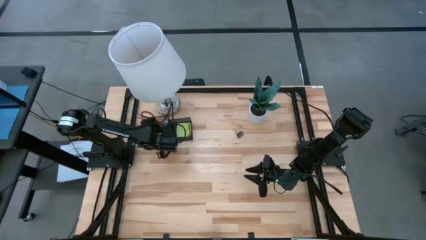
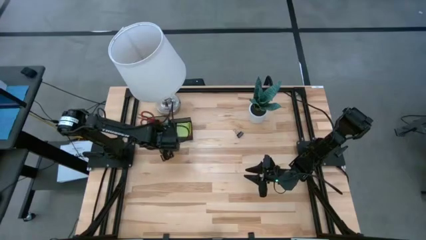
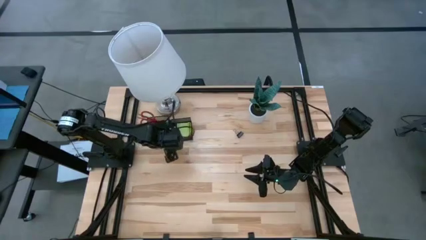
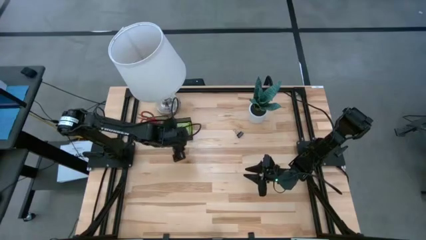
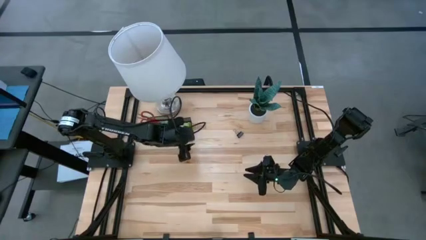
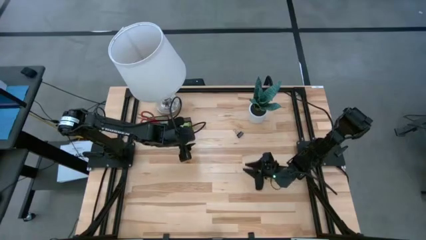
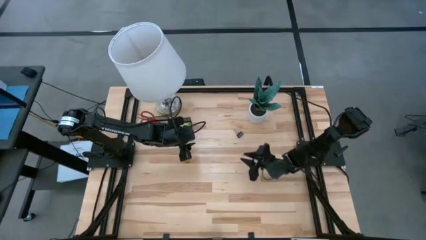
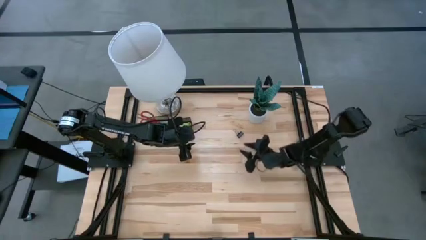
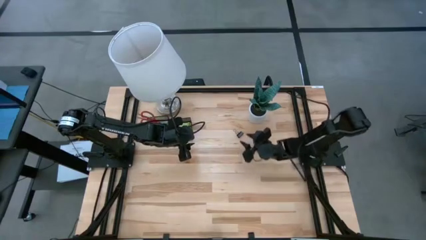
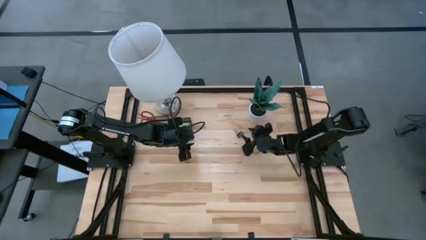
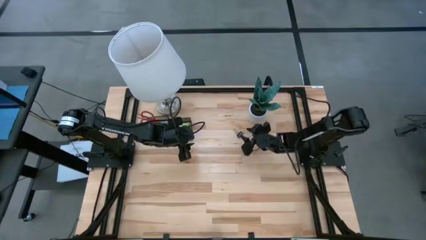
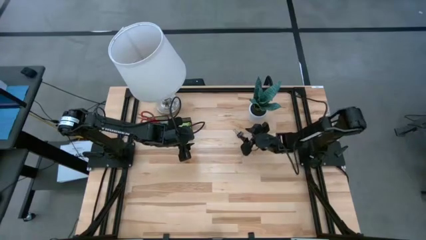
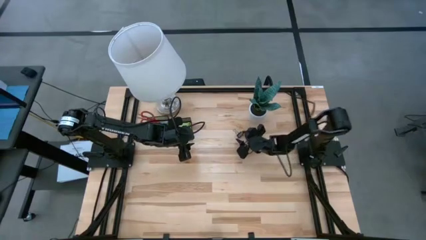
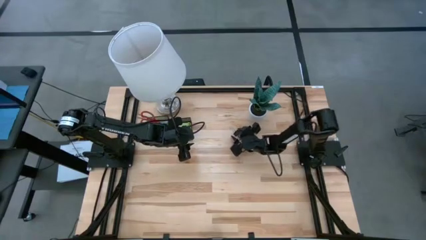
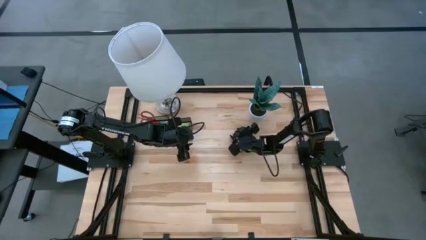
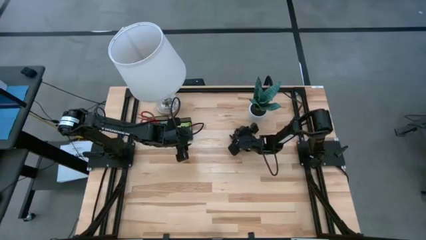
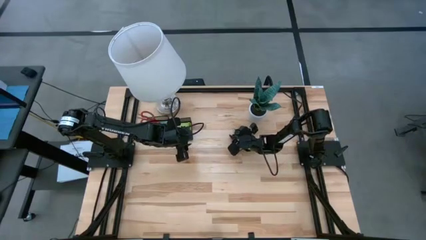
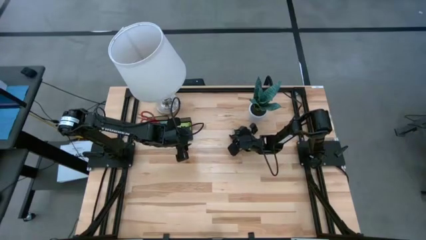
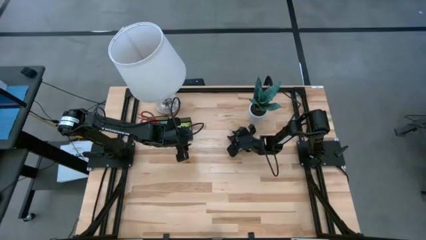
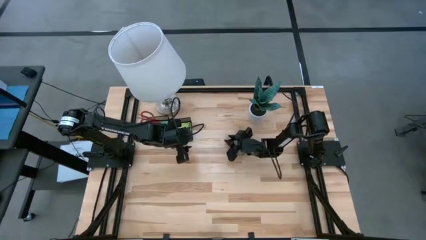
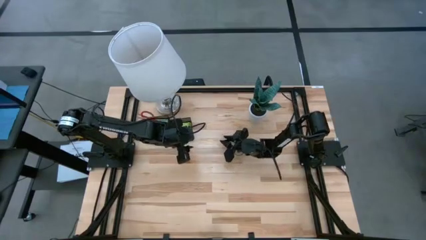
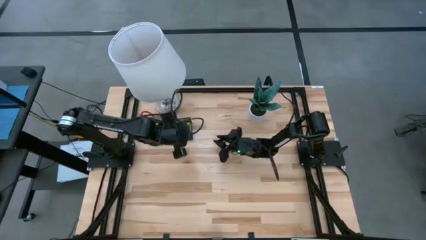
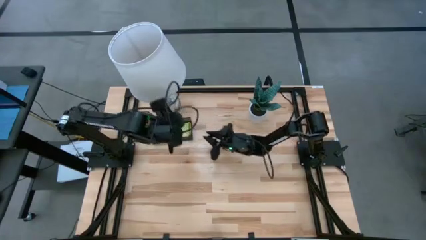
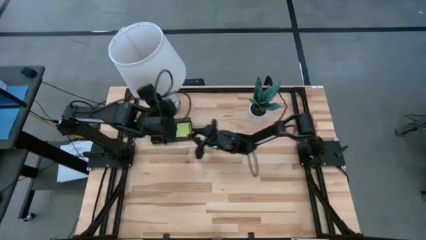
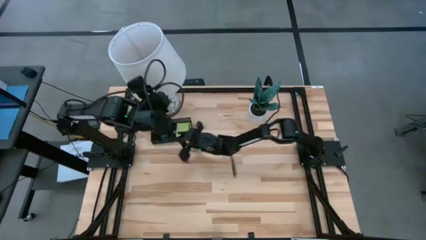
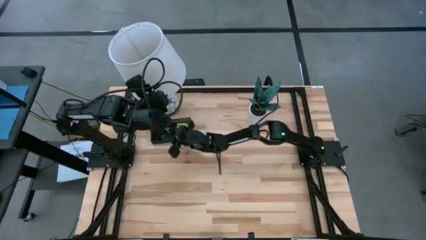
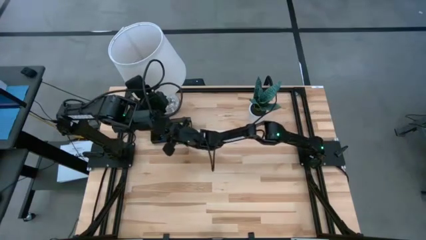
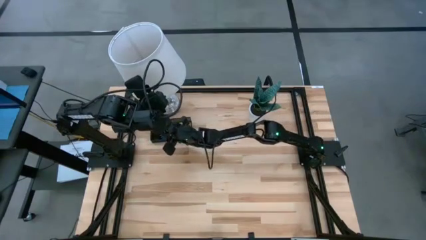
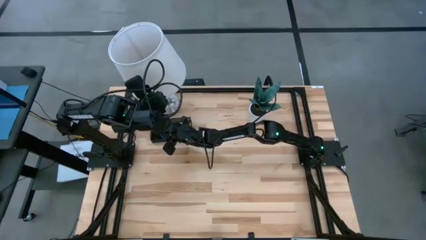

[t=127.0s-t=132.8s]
Task: Pick and place office supplies into organizer
Put the black binder clip into the black desk organizer

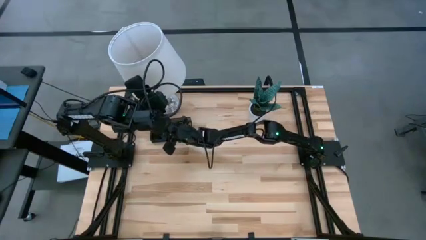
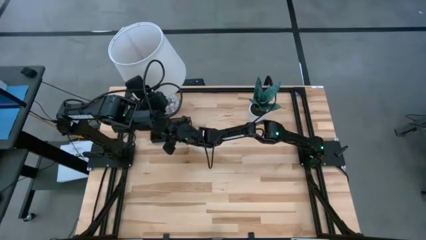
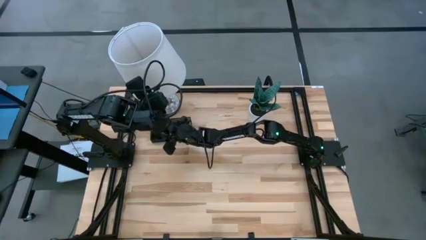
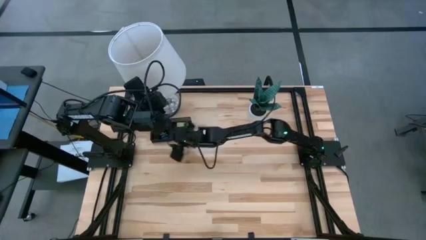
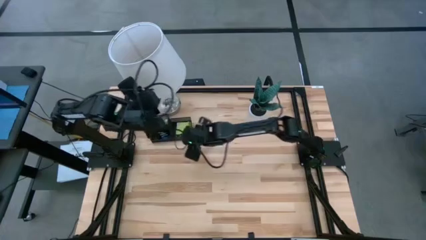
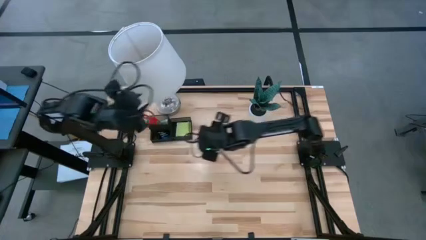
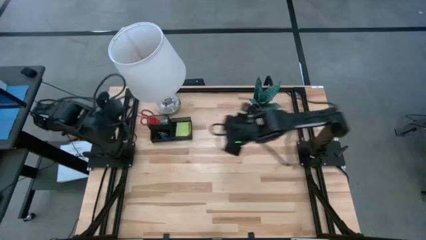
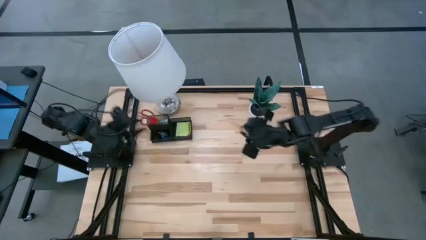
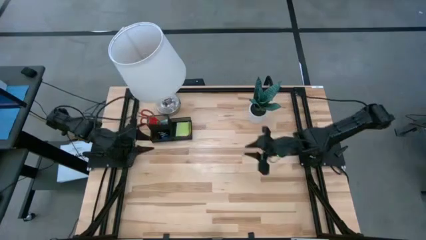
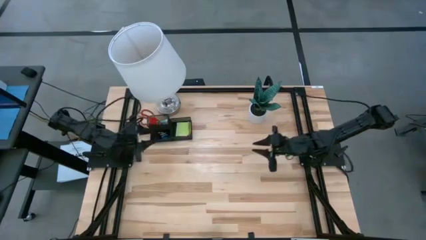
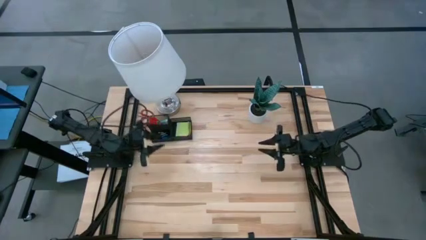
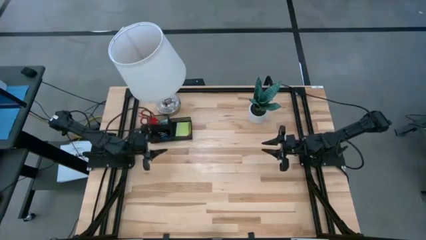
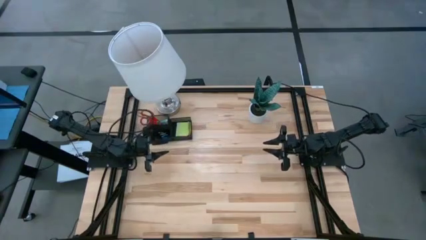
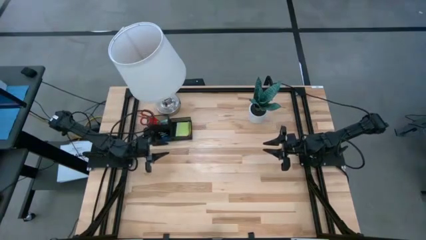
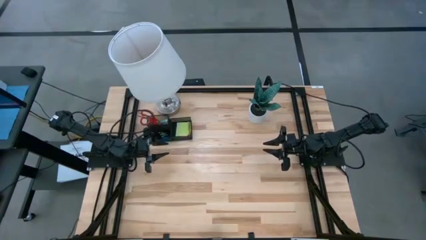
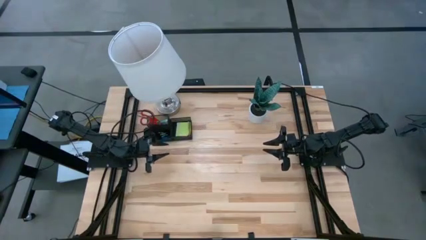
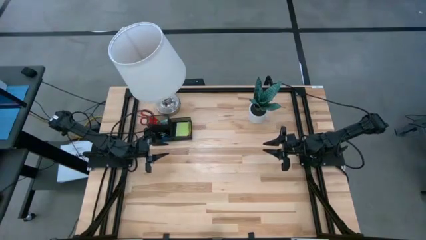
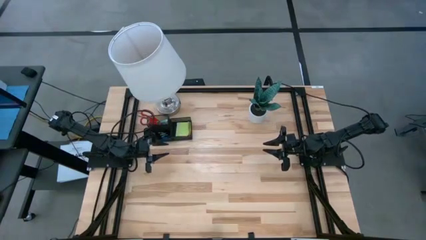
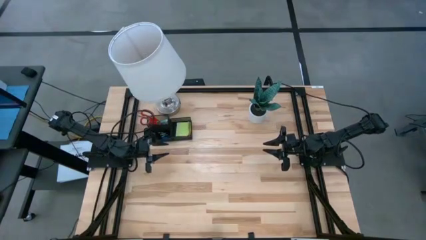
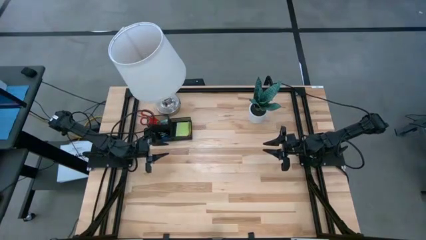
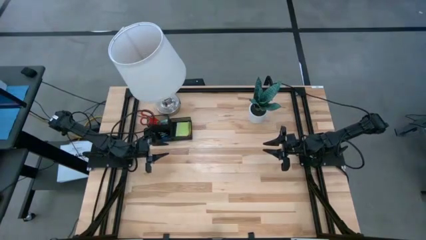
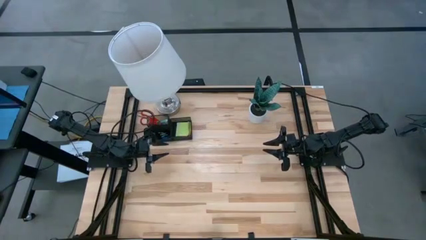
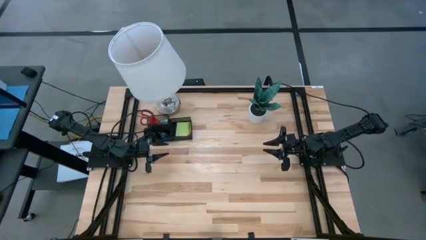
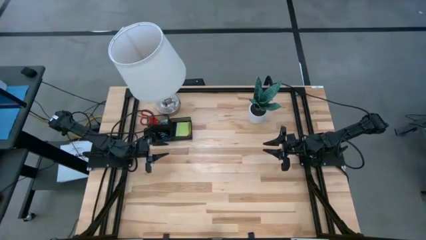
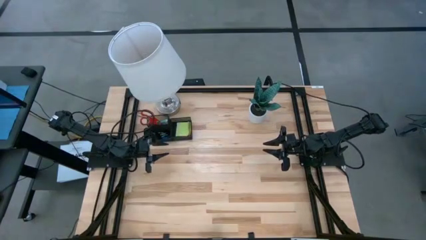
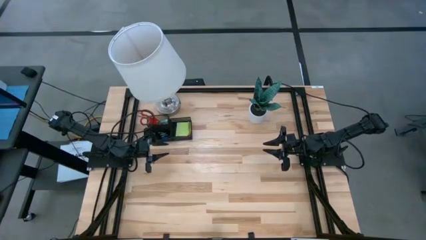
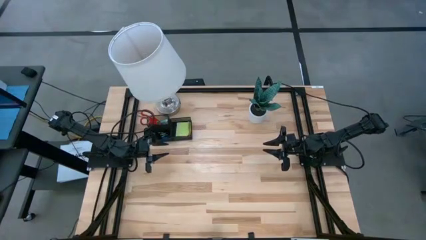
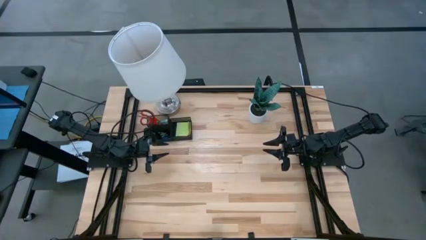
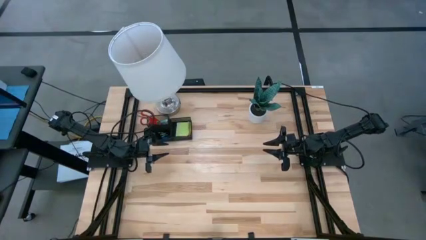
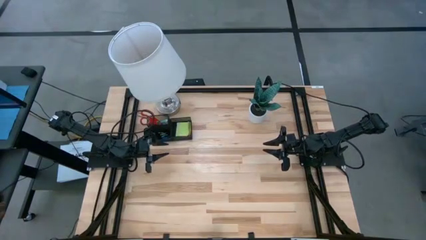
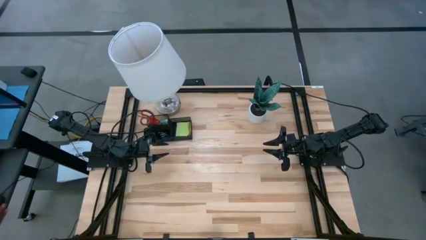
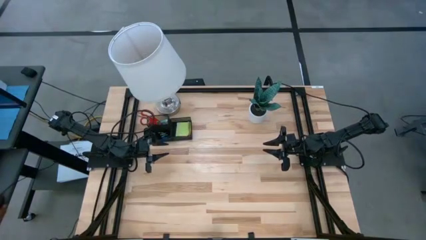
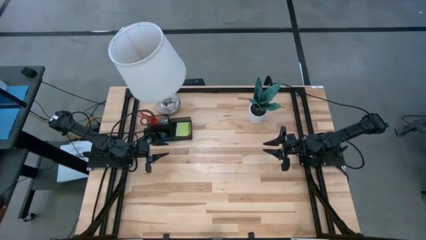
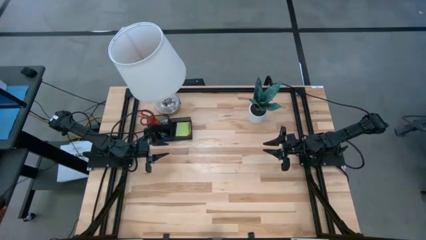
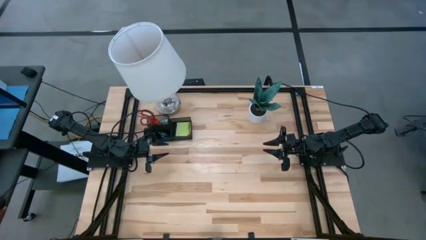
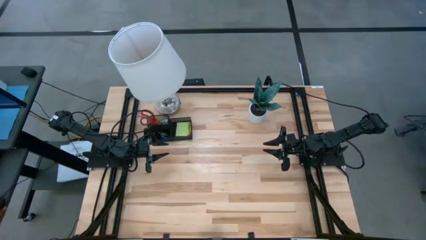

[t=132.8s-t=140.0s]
Return to Home Position

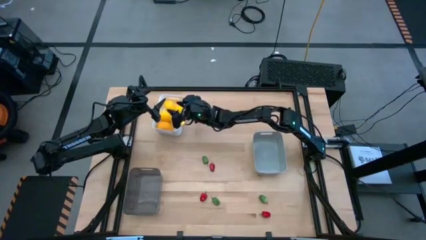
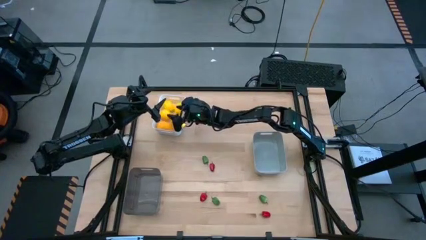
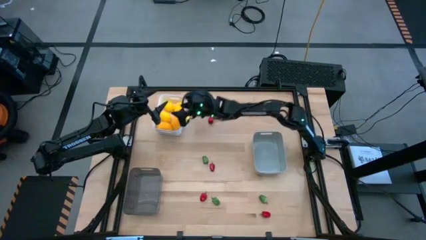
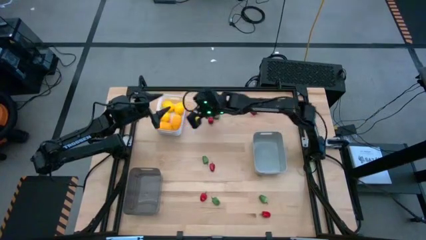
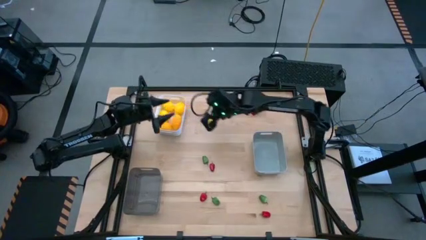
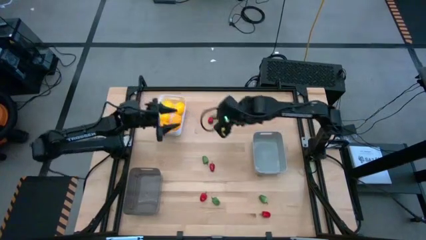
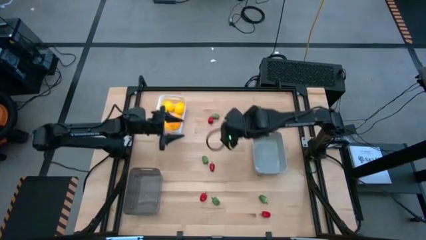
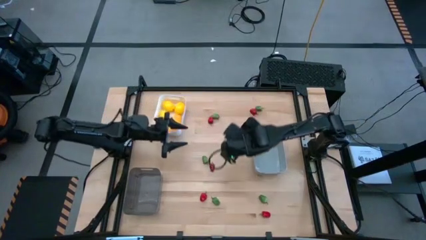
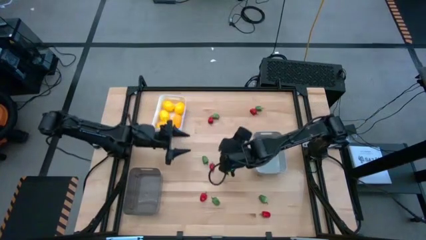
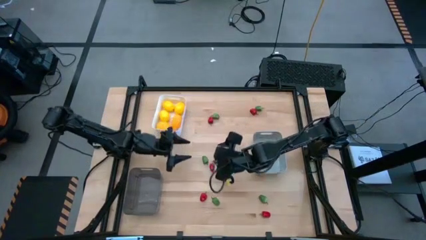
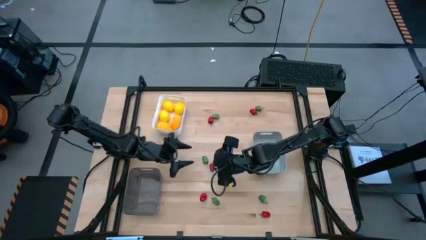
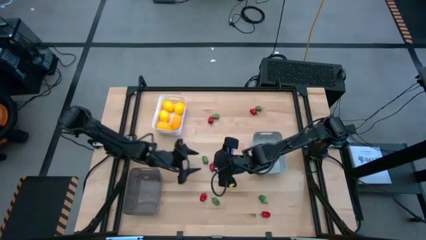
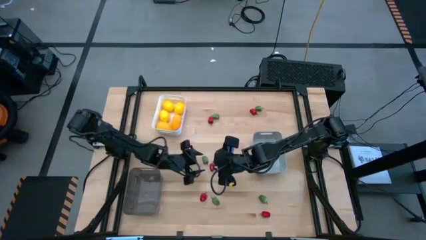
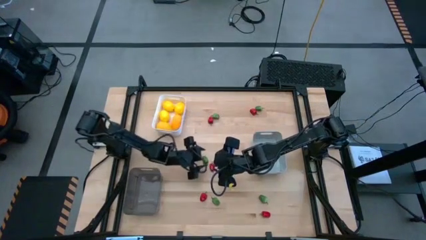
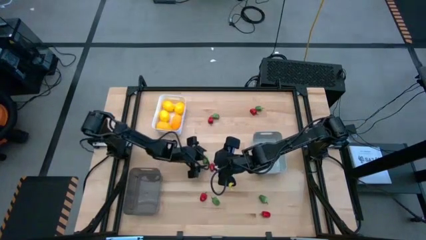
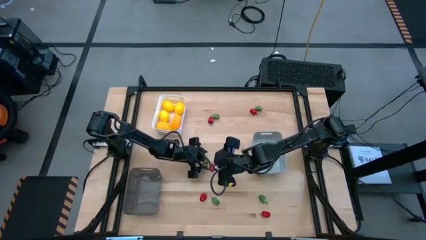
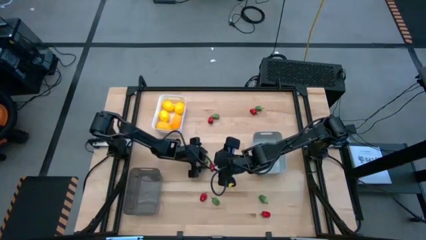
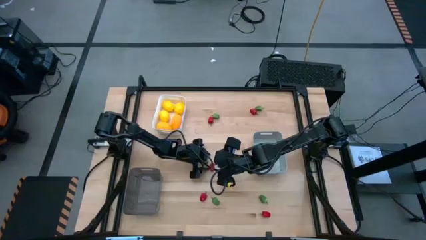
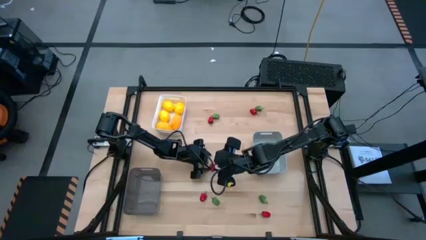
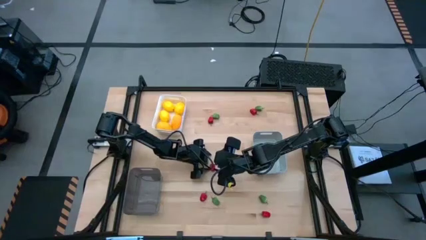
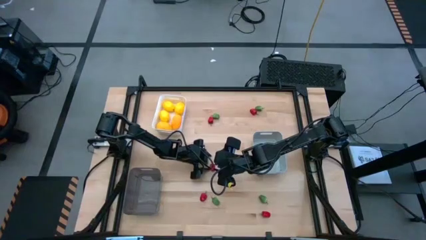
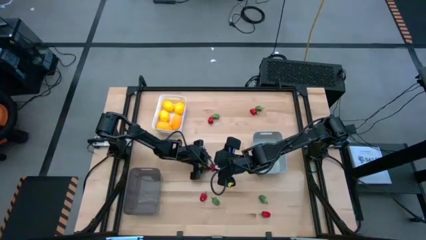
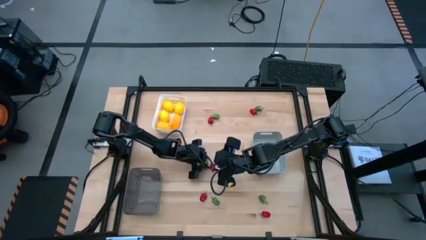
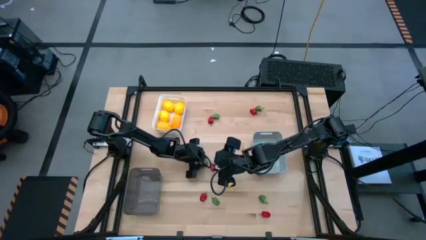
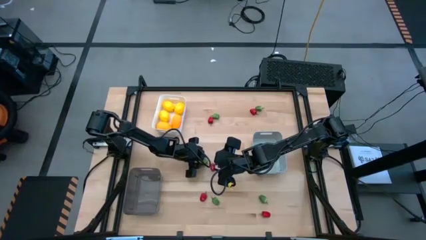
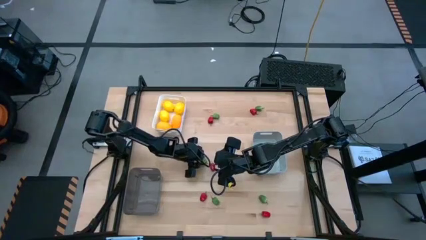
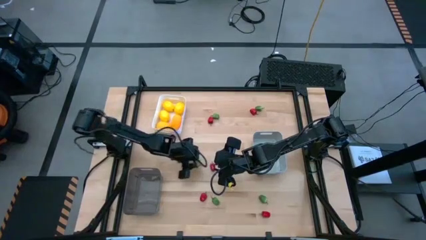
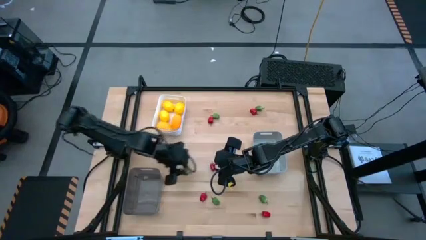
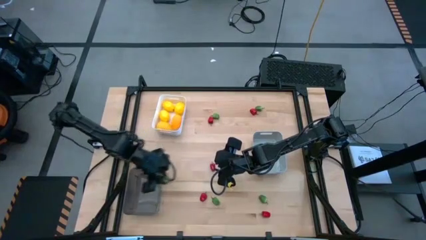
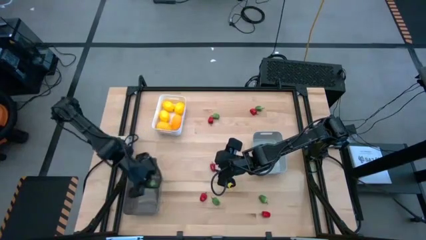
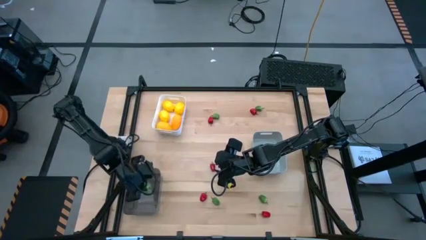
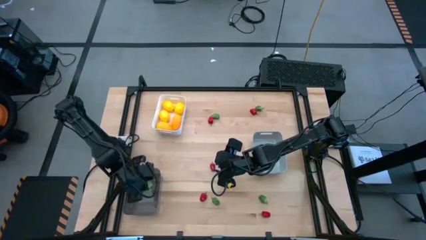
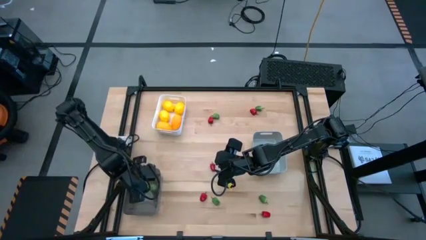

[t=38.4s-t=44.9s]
Task: Sort produce into baskets
Put the middle left green chili pepper into the transparent black bin
